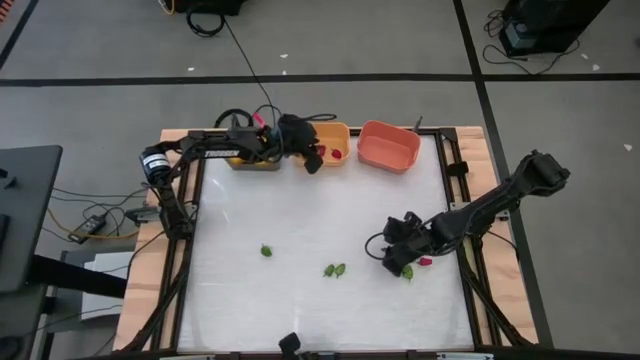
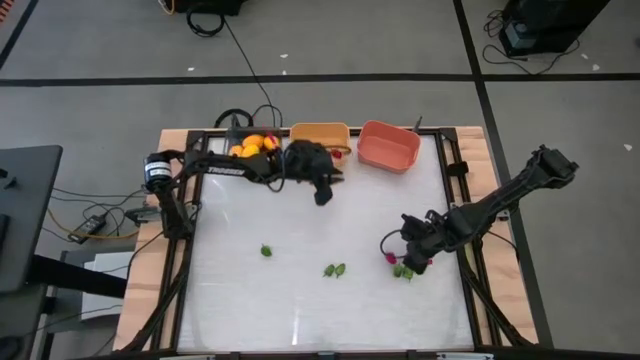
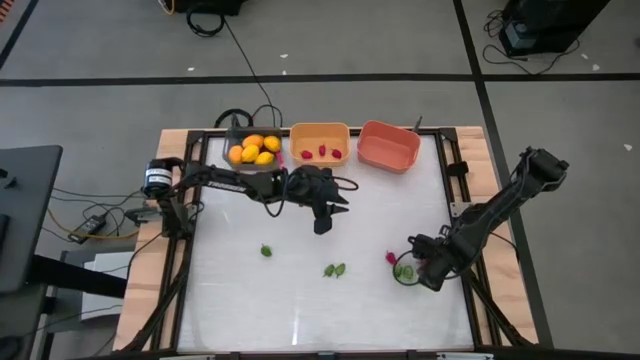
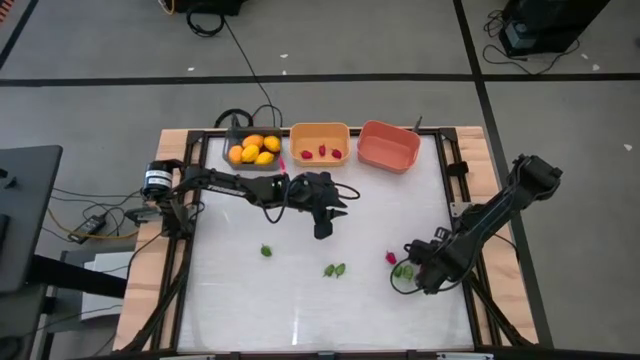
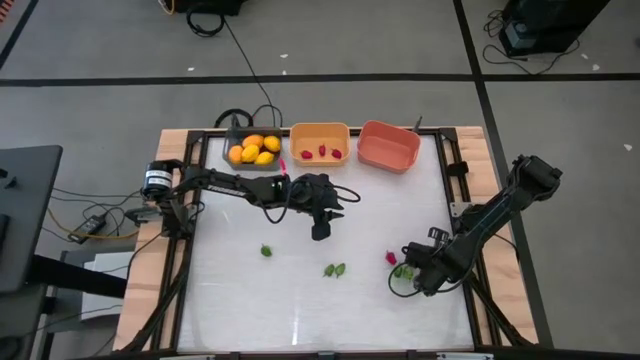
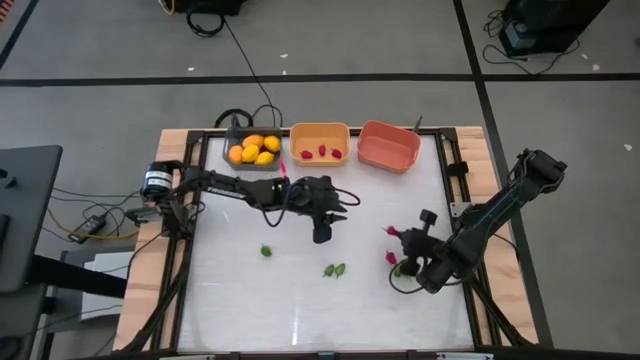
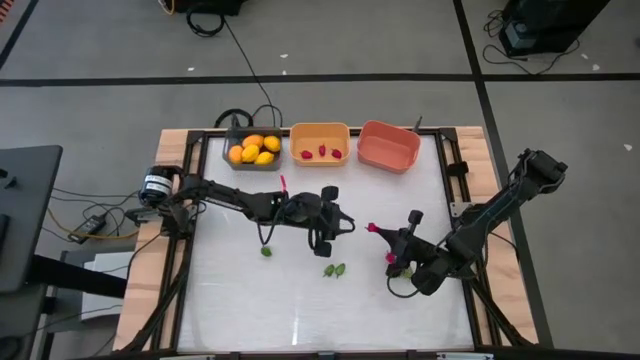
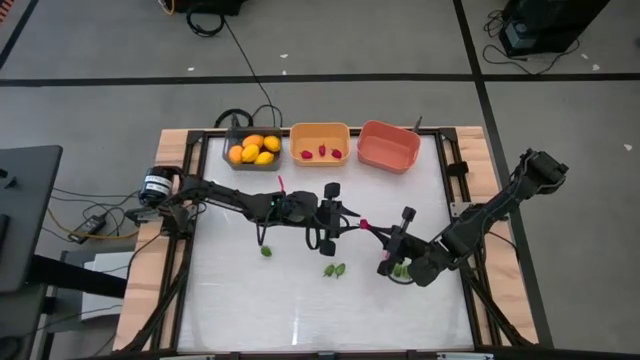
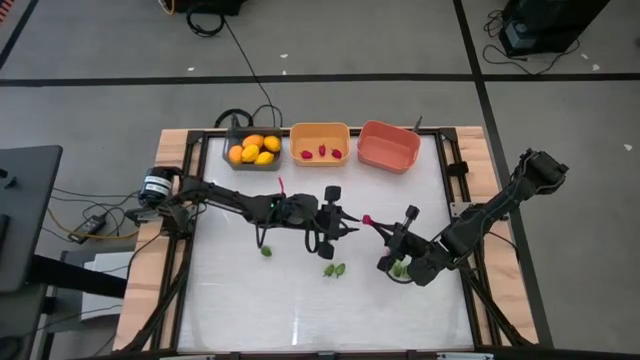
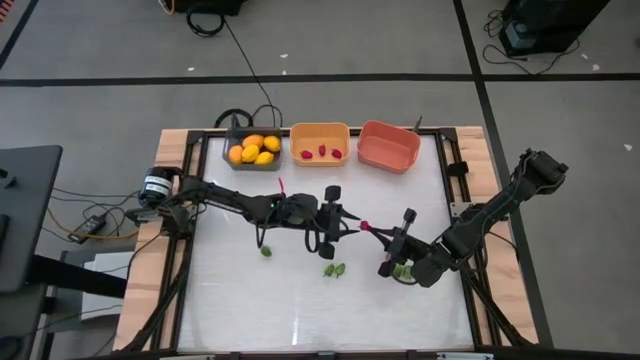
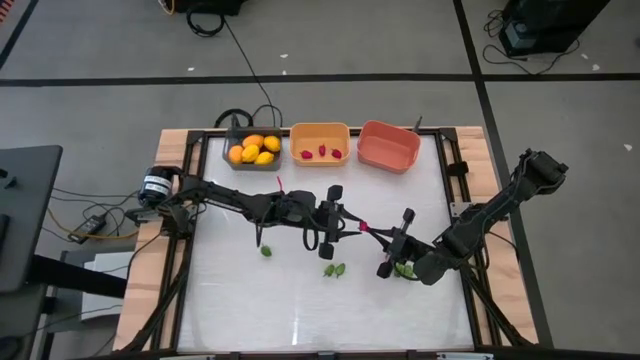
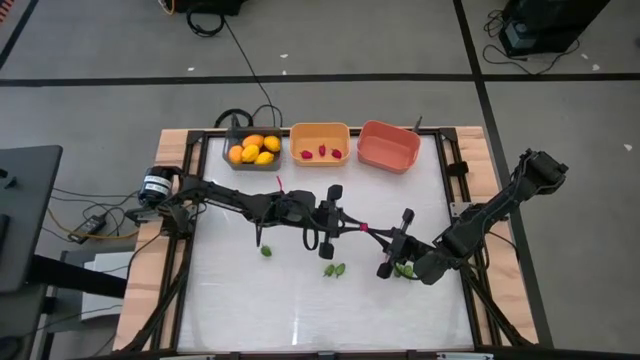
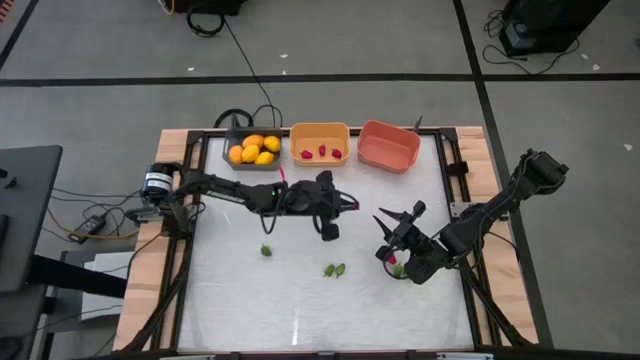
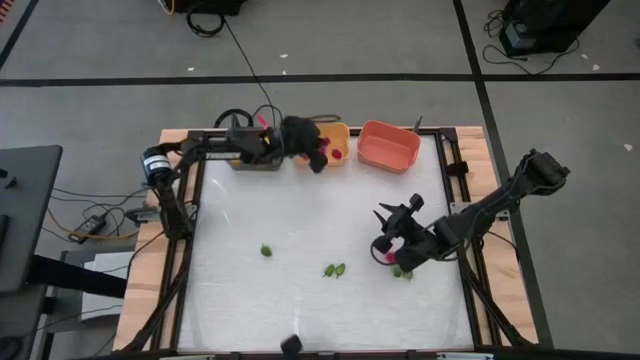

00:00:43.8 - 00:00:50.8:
Task: Sort produce into baskets
Put the red chili pepper into the yellow bin

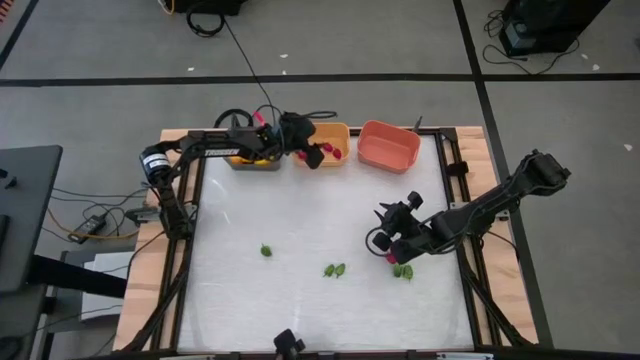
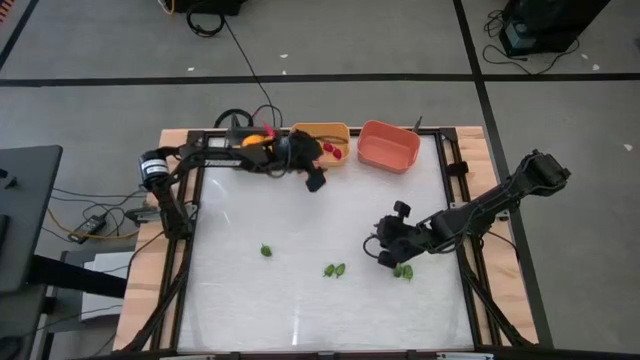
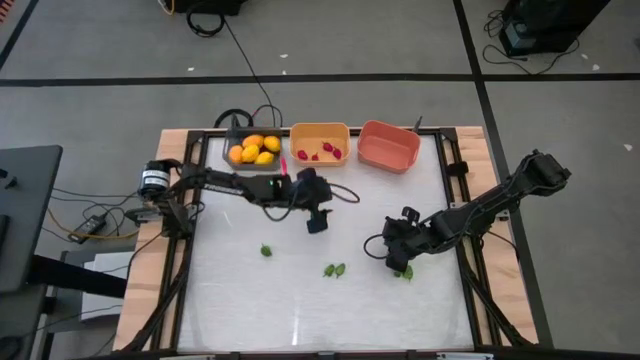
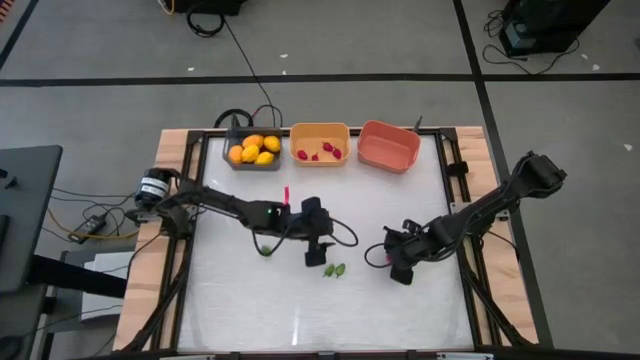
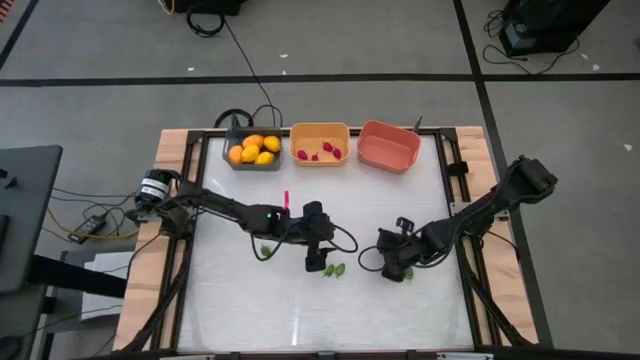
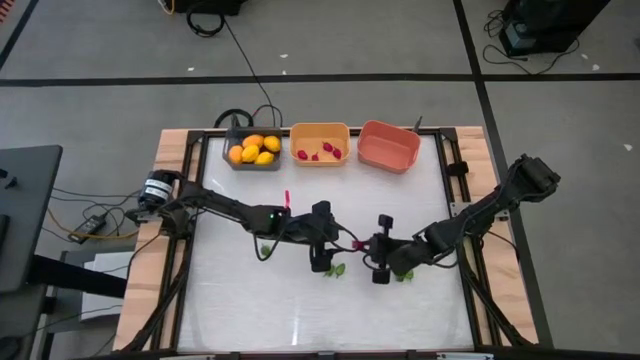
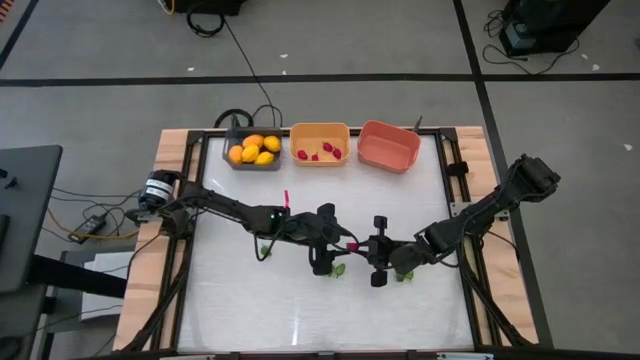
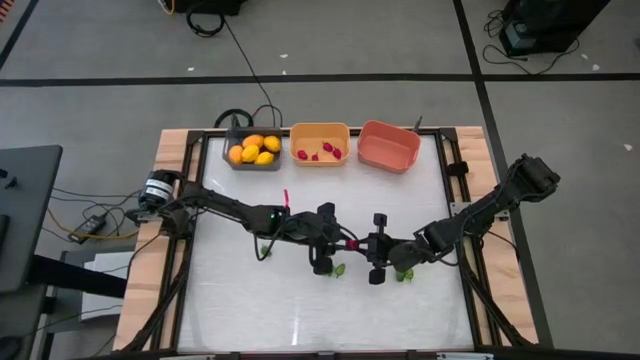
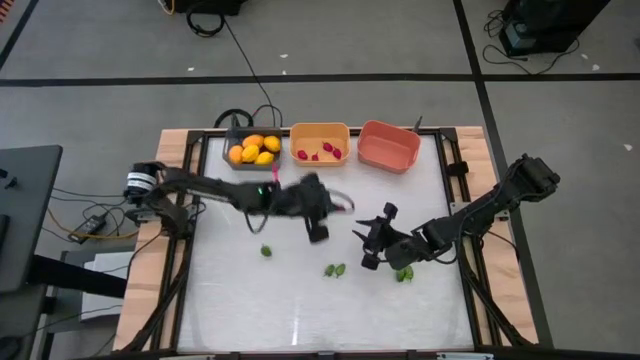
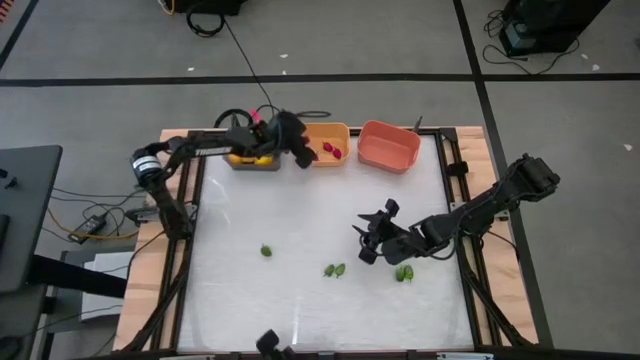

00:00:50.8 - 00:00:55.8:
Put the red chili pepper into the yellow bin

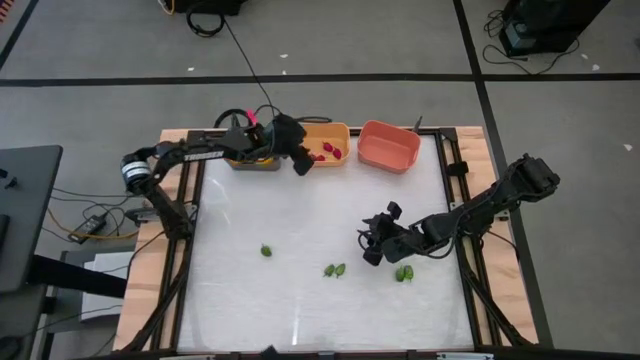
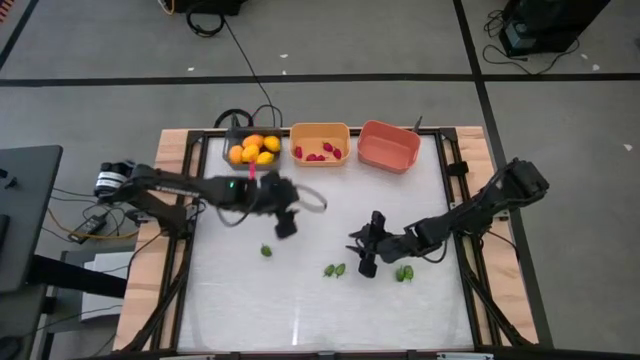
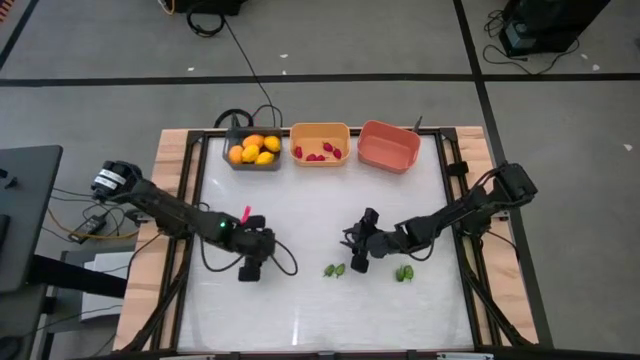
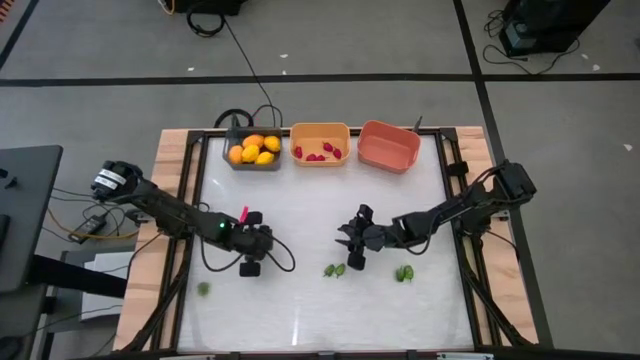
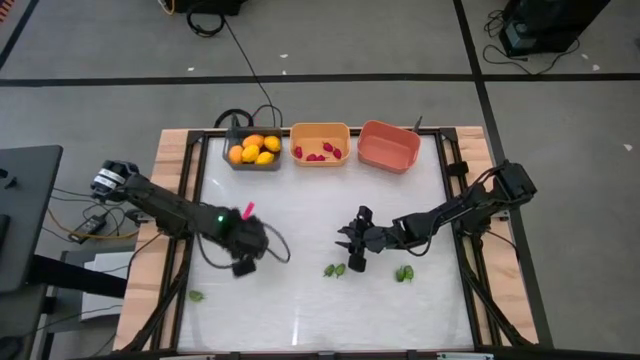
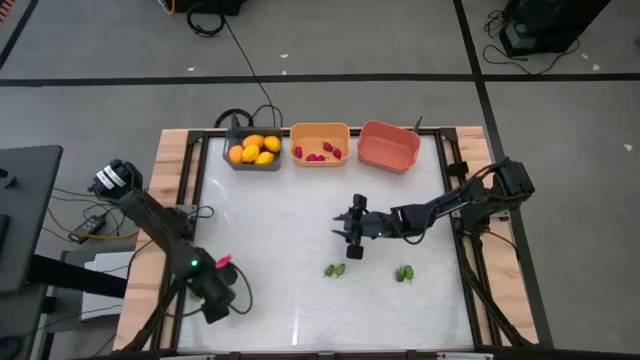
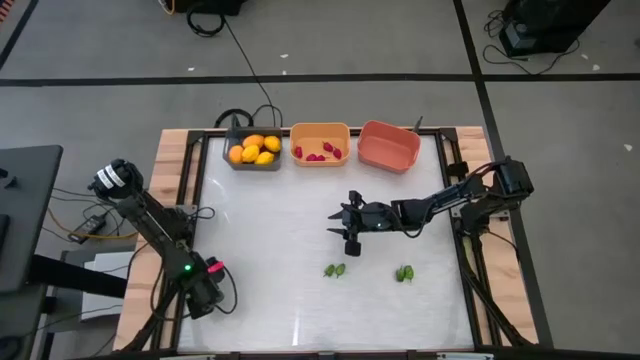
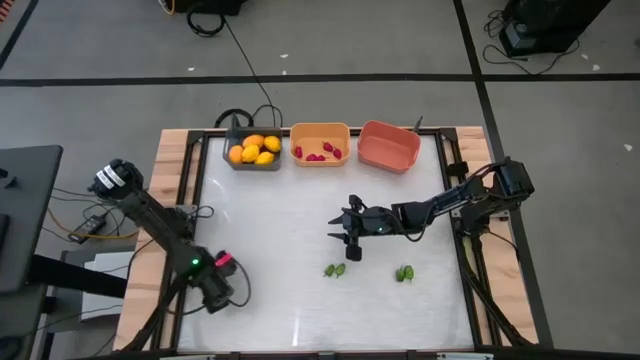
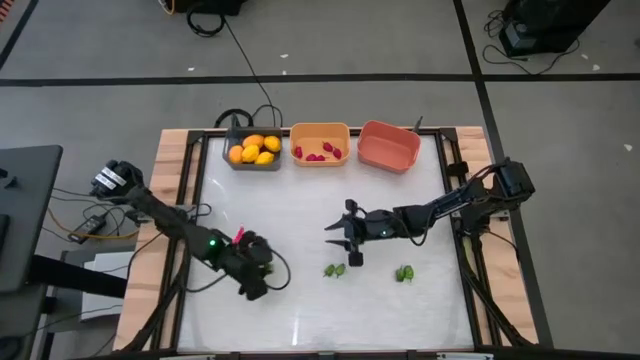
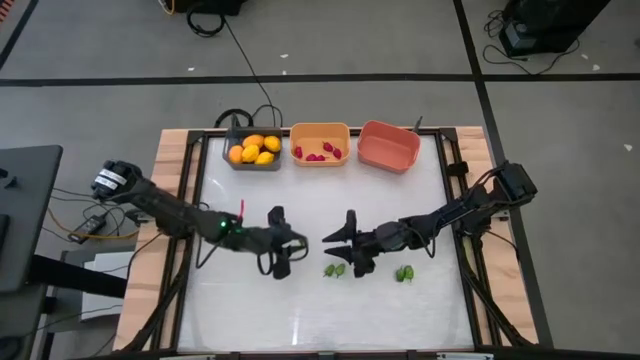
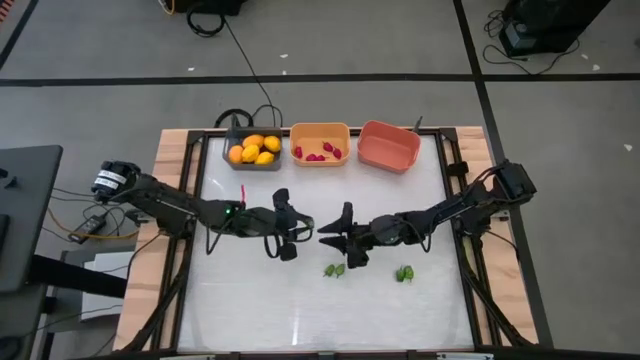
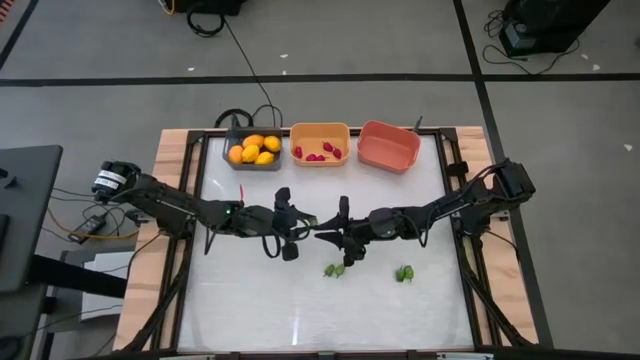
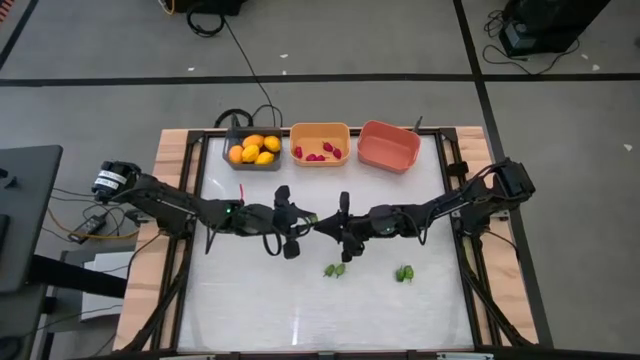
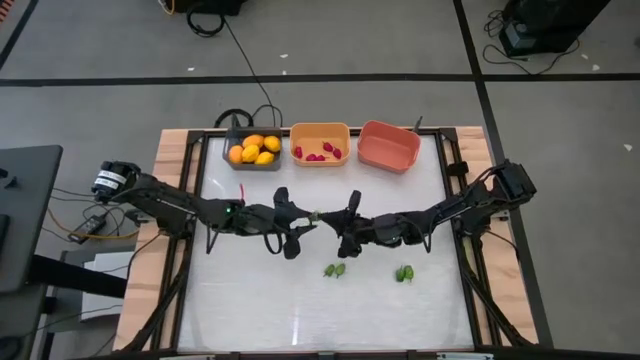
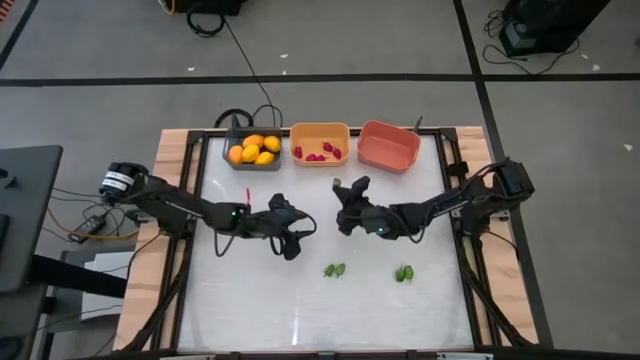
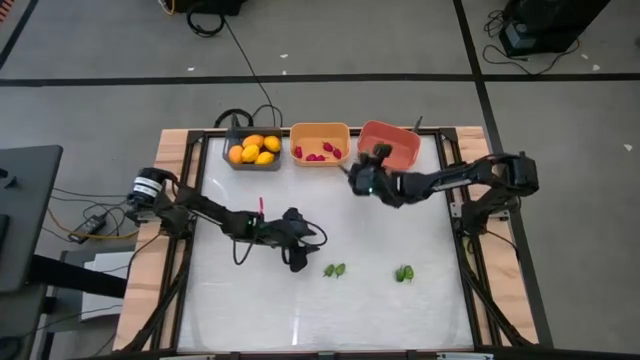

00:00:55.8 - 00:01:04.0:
Put the green chili pepper into the orange bin
